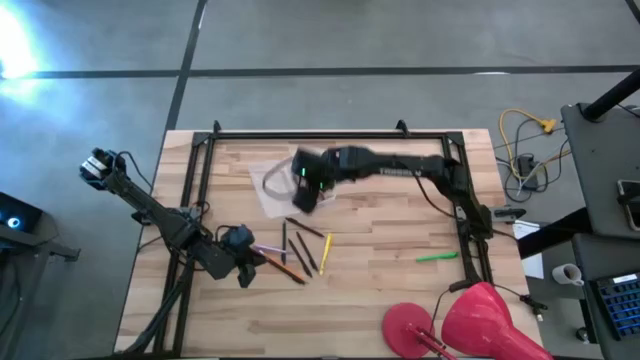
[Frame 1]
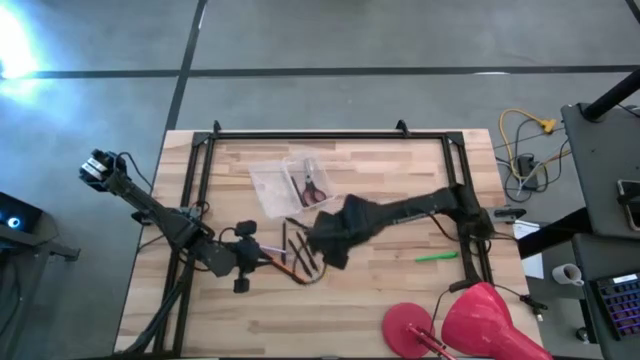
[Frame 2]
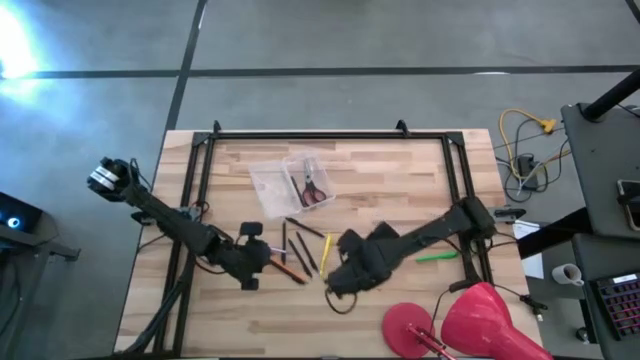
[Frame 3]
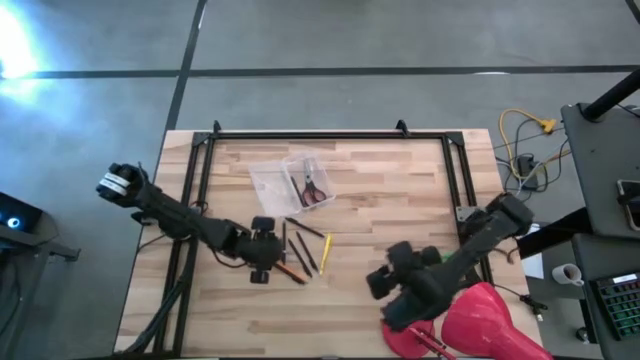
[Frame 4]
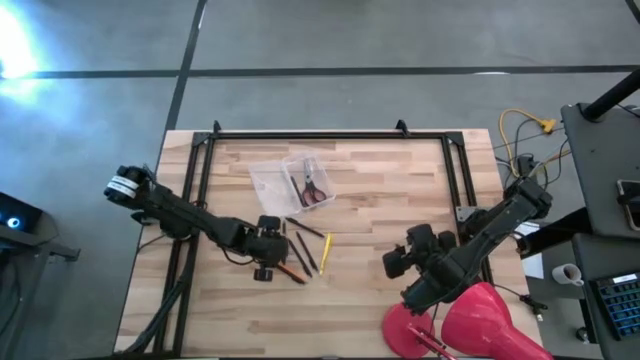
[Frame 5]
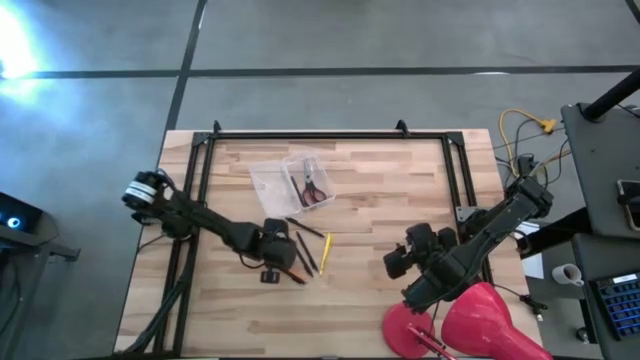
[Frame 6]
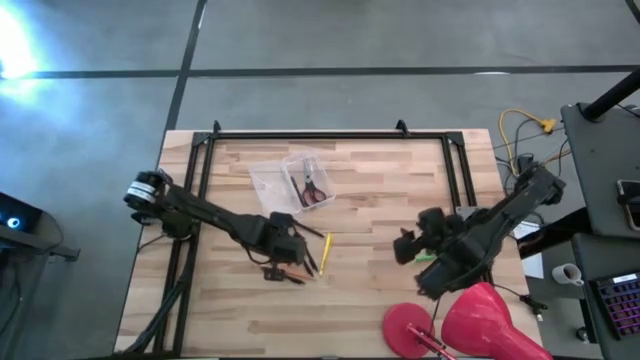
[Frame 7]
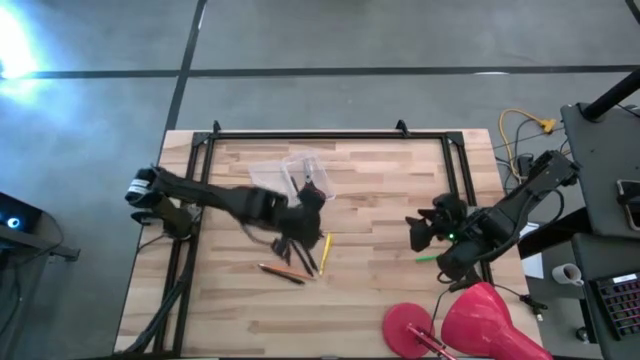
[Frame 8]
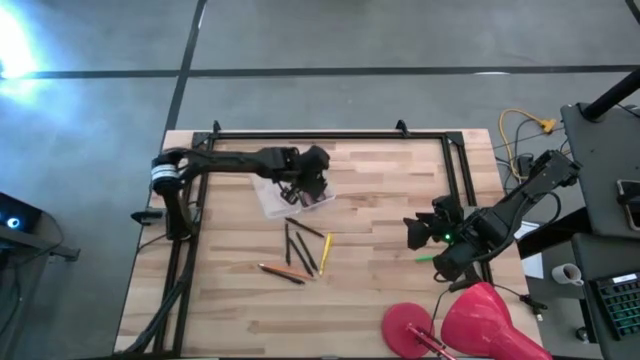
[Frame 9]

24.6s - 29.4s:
Task: Pick & place school supplies into a supply box
Put the violet pen into the transparent supply box

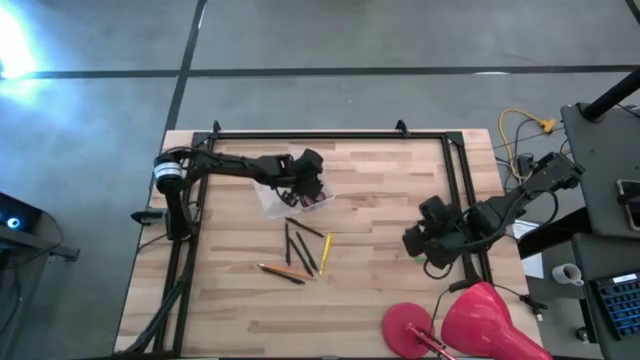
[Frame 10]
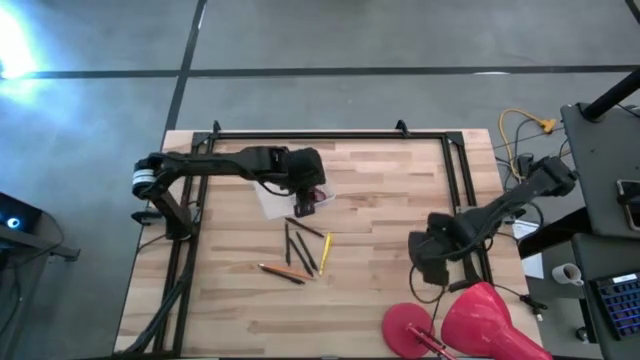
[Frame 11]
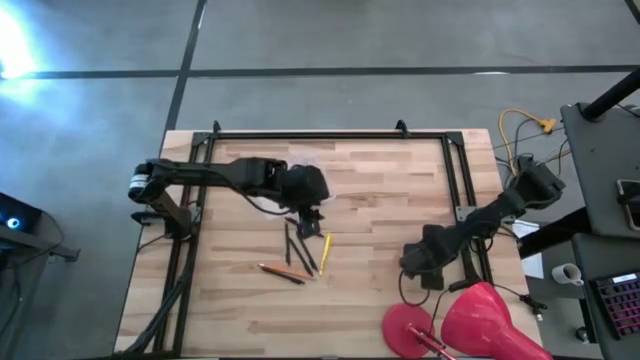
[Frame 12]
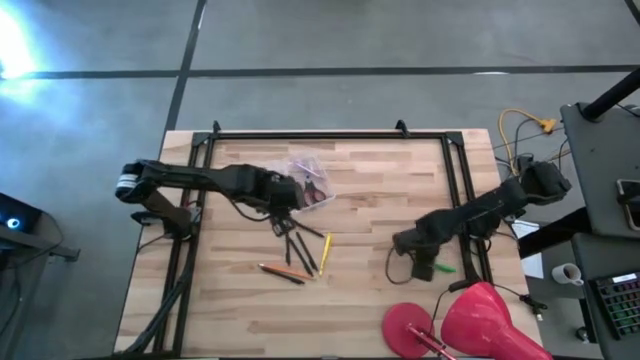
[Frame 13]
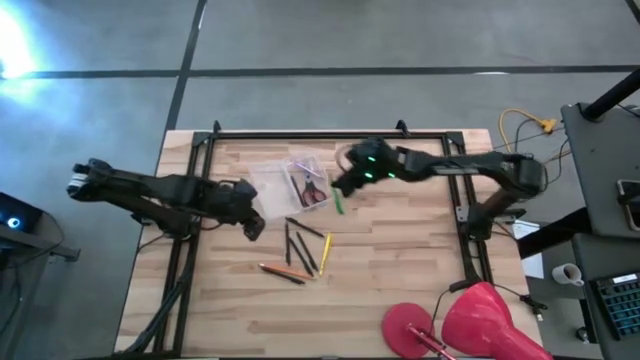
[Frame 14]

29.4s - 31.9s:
Put the green pen into the transparent supply box

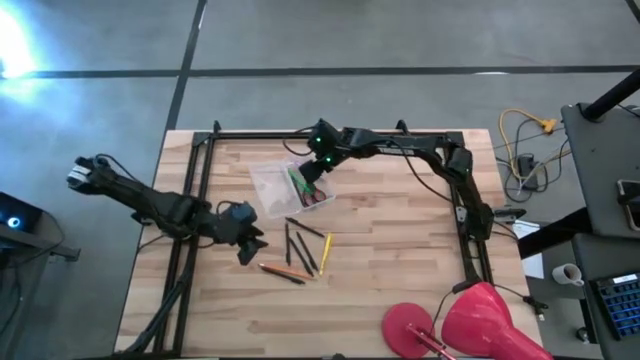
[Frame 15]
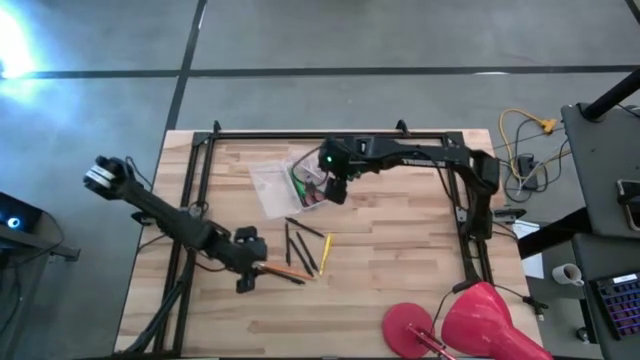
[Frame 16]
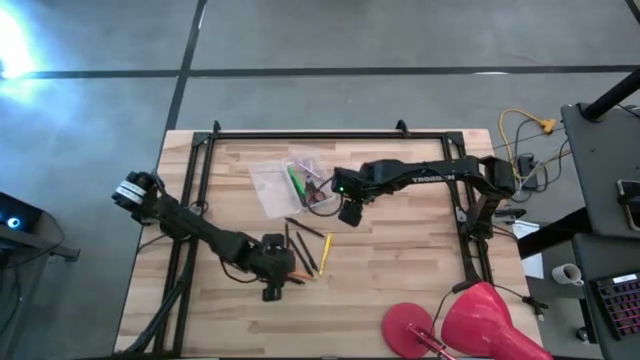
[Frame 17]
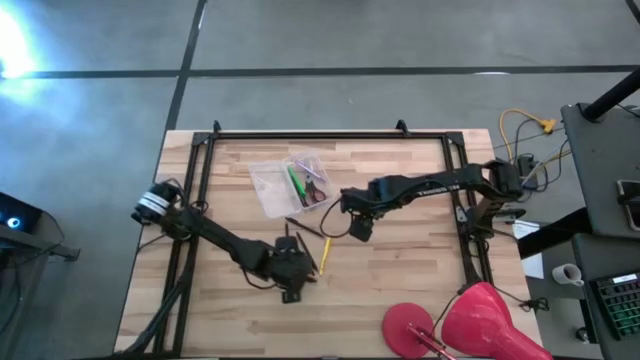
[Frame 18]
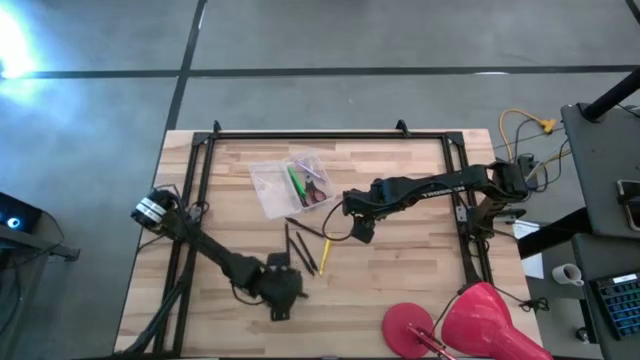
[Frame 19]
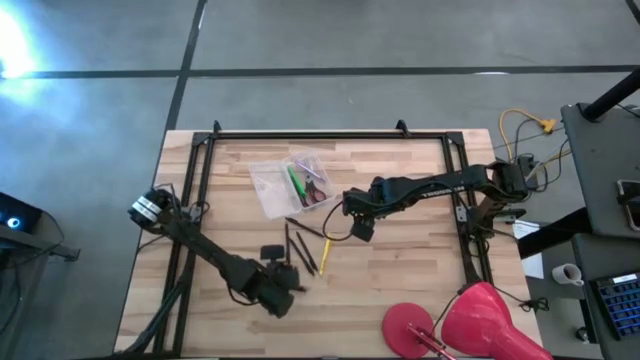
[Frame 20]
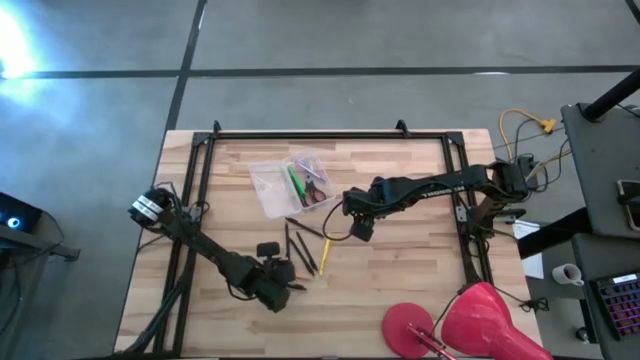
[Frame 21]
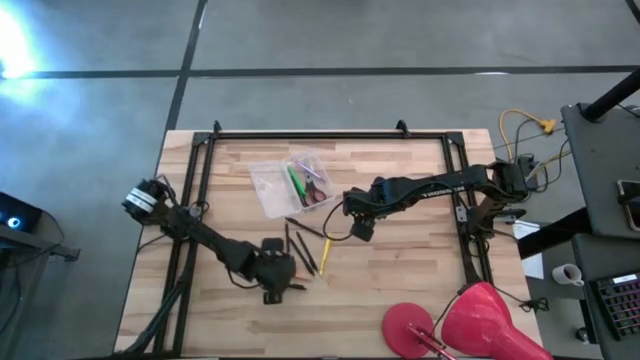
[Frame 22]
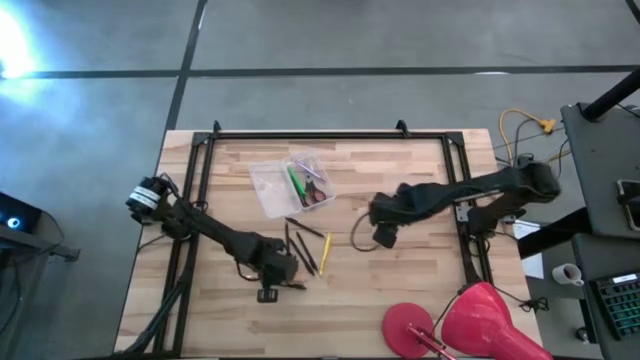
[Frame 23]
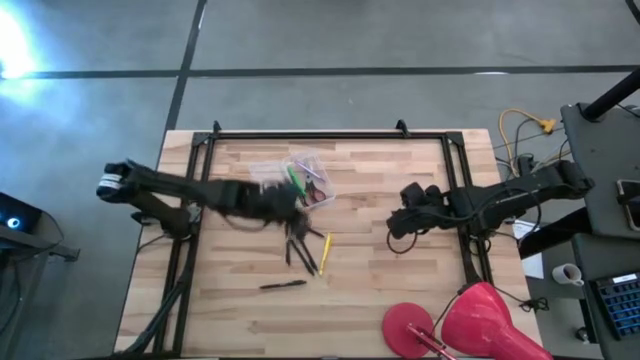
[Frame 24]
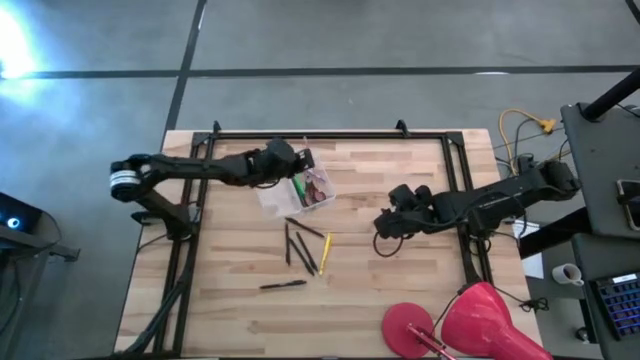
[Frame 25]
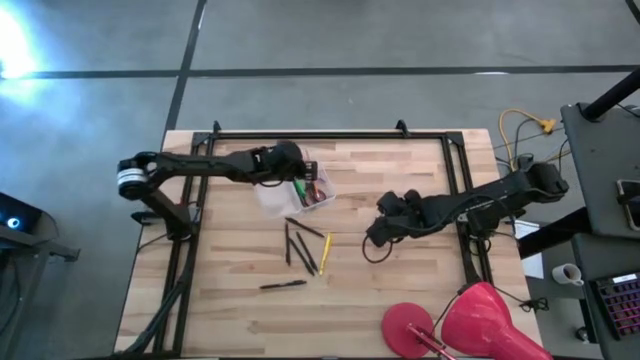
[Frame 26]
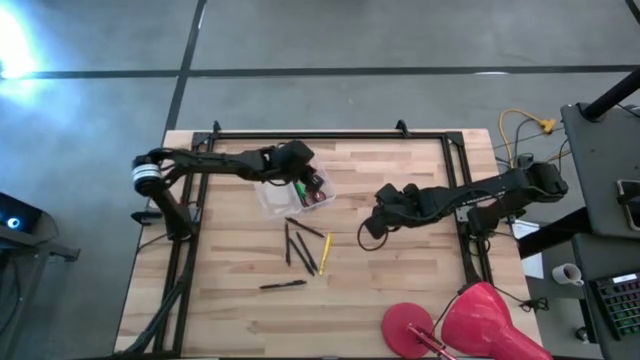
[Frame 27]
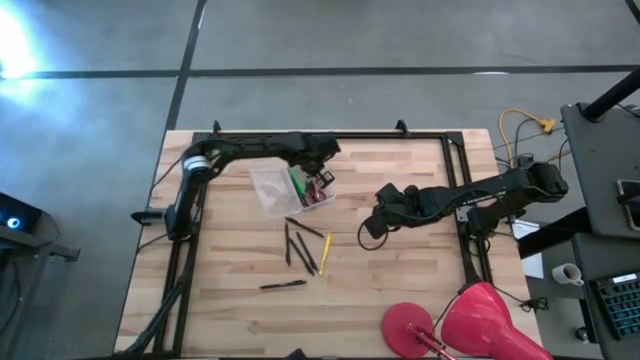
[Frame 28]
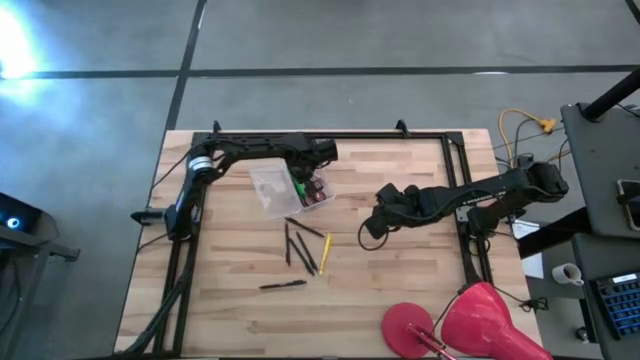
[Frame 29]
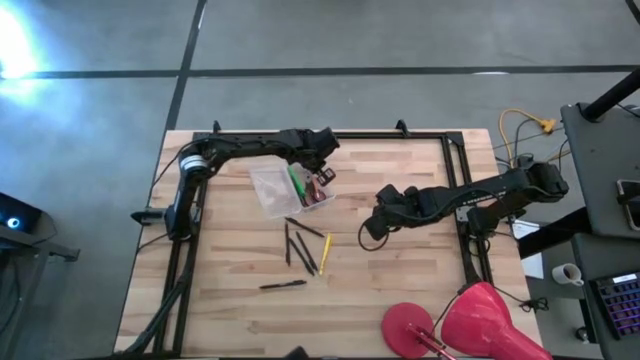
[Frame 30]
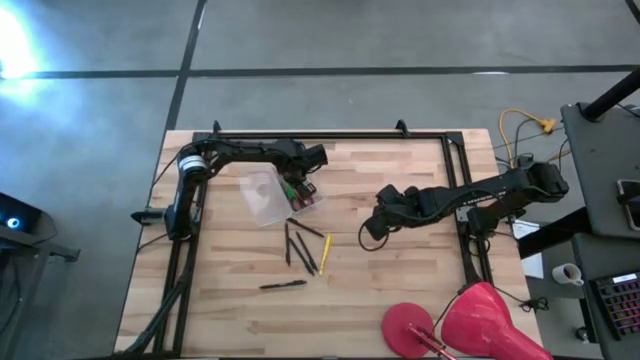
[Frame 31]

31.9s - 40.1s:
Put the orange pencil into the transparent supply box

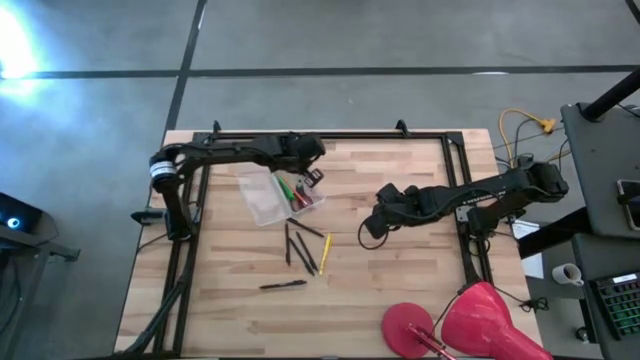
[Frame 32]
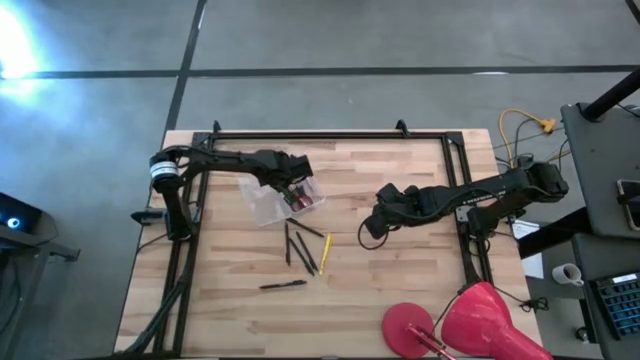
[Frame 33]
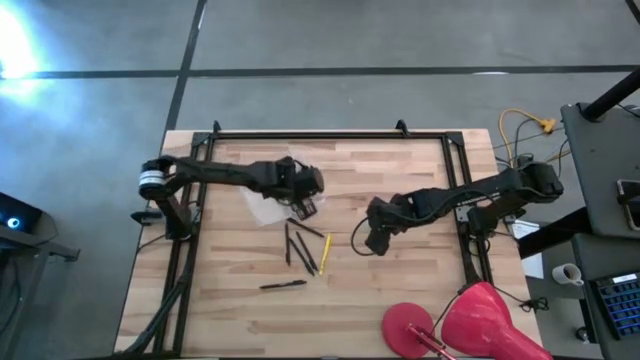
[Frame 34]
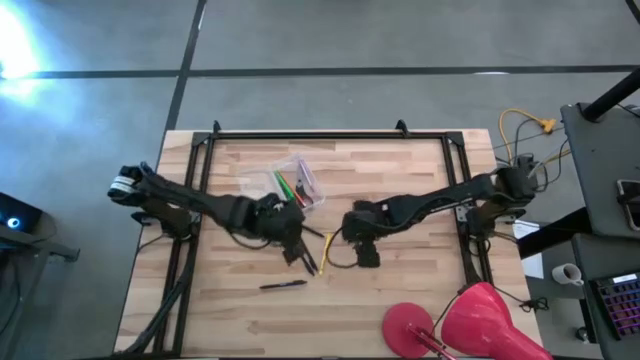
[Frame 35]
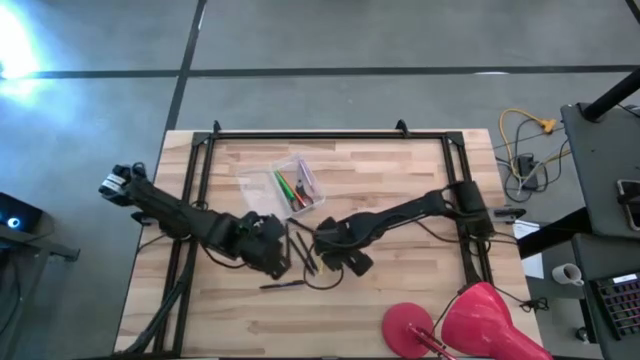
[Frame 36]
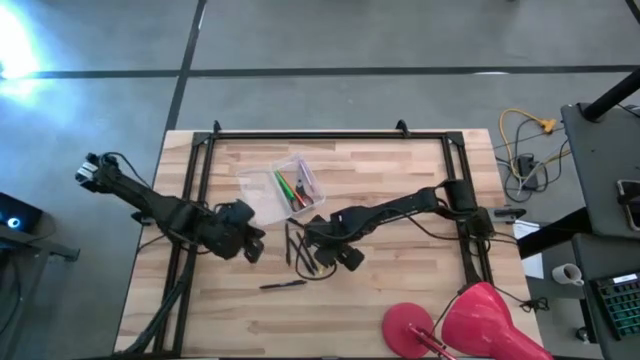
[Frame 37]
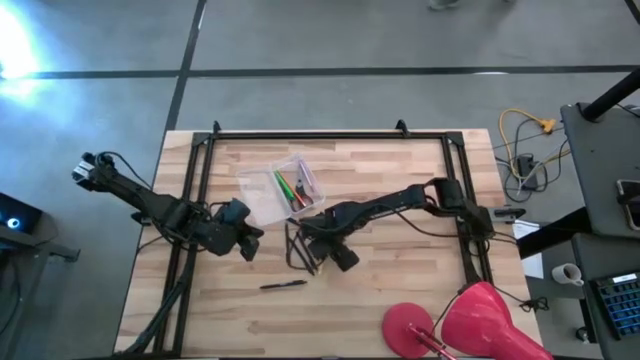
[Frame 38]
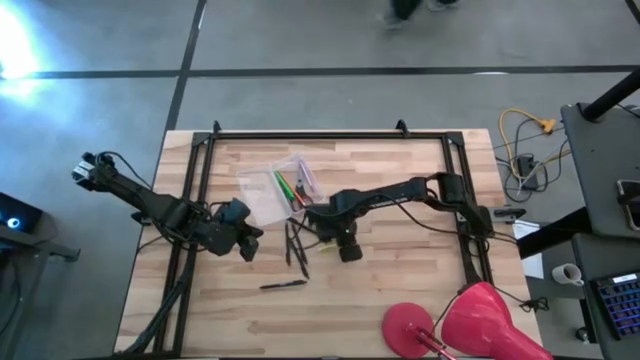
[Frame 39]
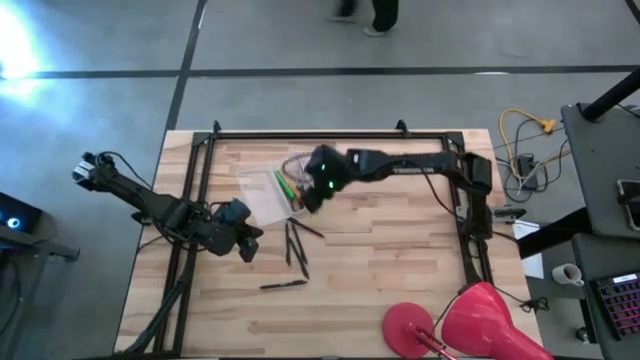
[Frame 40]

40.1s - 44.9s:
Put the yellow pen into the transparent supply box

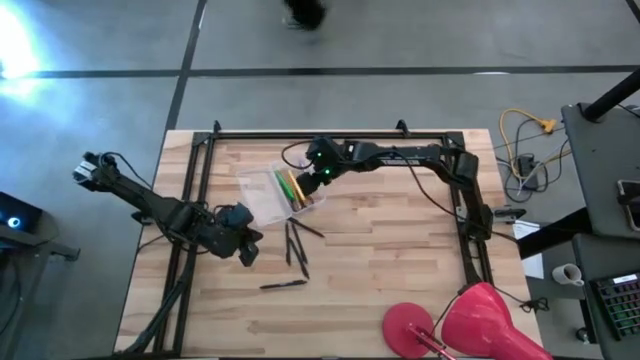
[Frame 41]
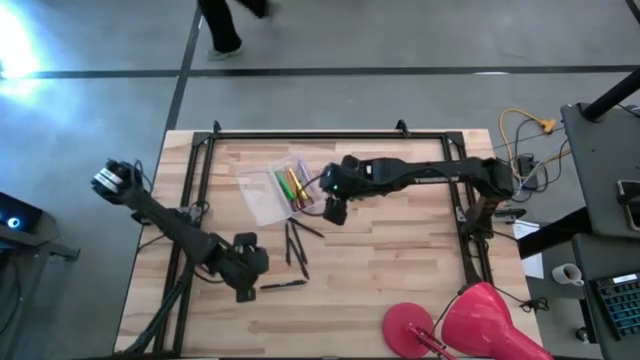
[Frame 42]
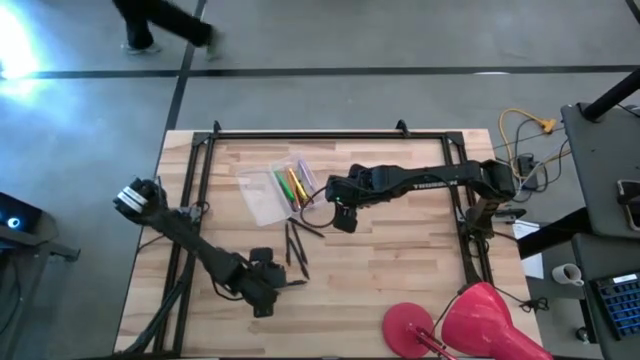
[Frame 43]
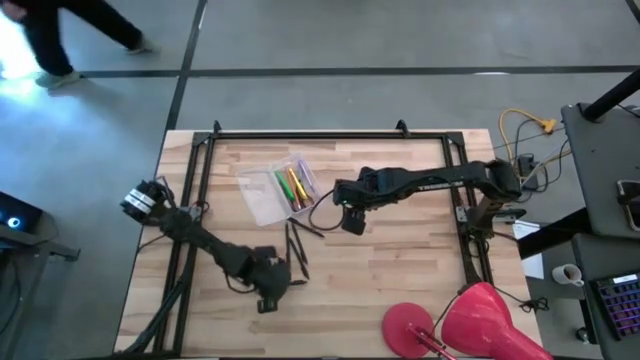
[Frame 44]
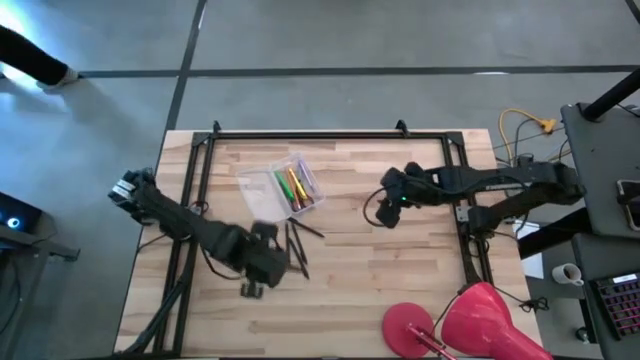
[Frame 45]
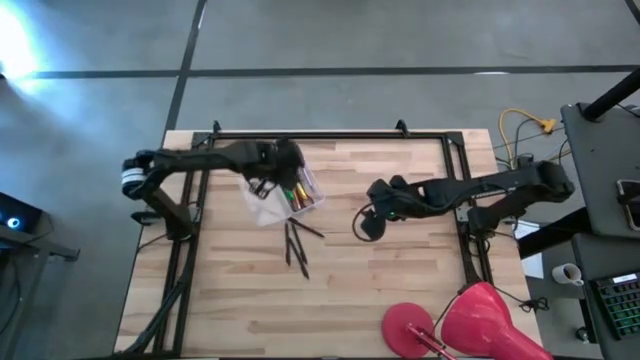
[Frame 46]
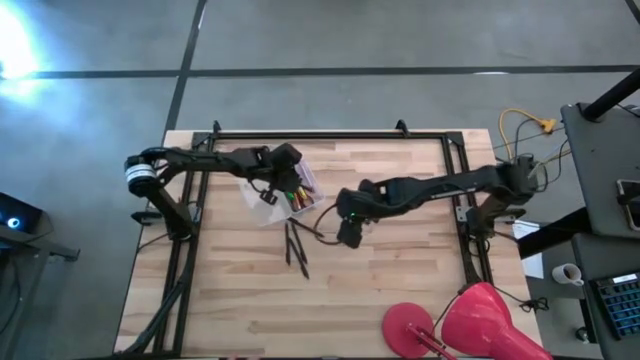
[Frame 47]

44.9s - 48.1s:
Put the black pen into the transparent supply box
